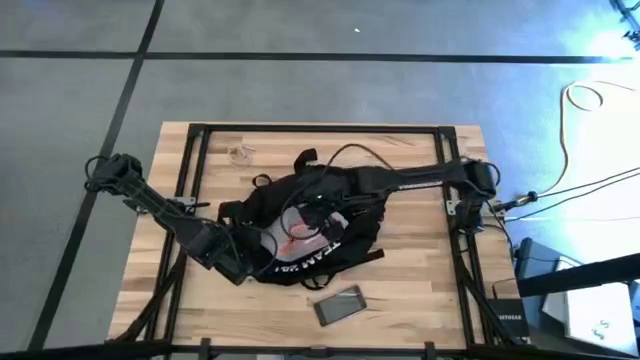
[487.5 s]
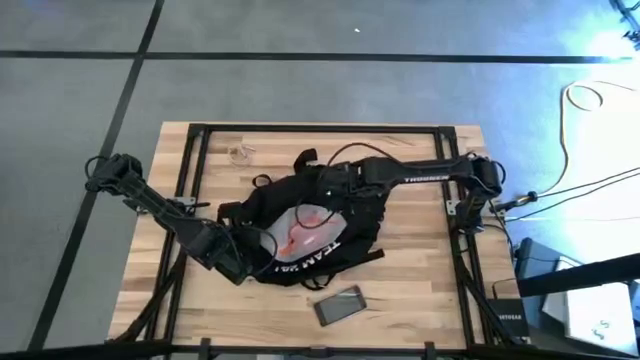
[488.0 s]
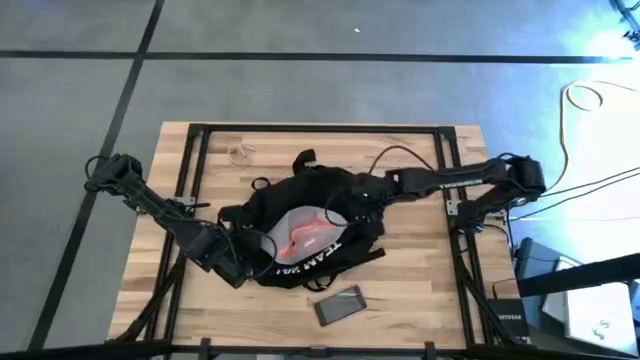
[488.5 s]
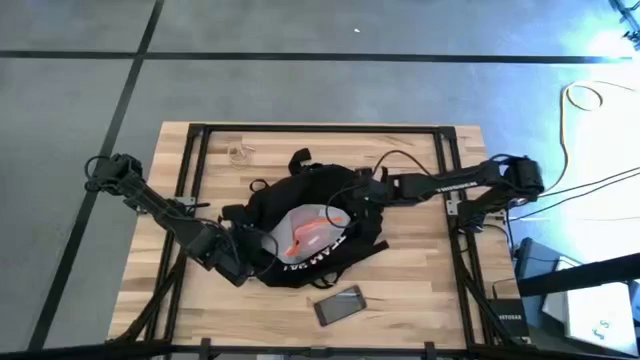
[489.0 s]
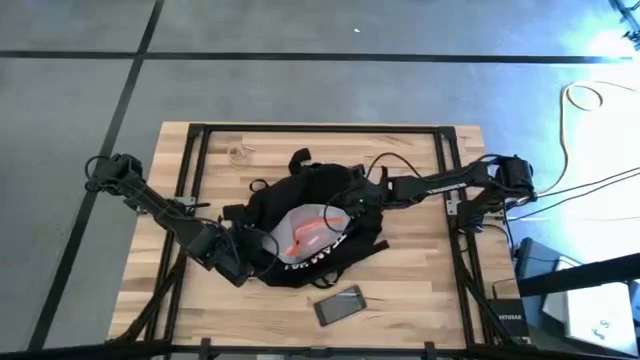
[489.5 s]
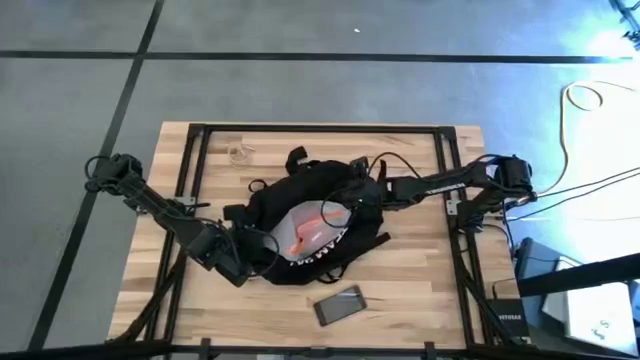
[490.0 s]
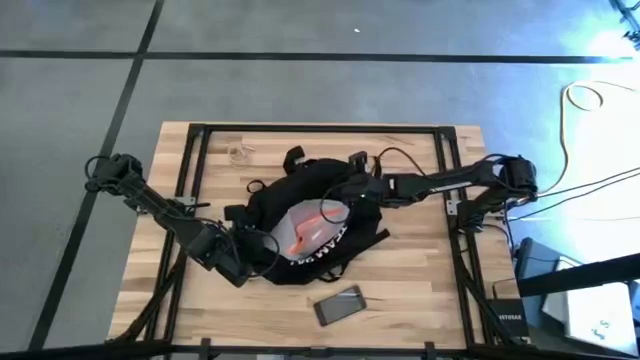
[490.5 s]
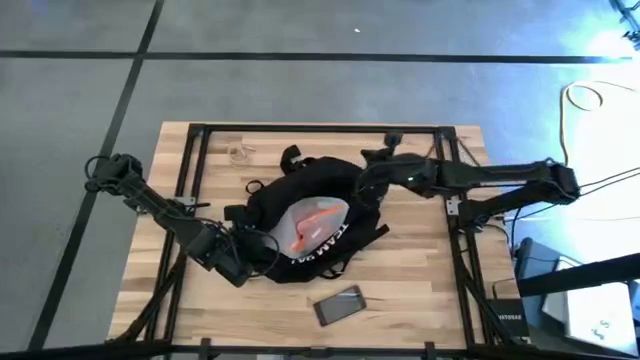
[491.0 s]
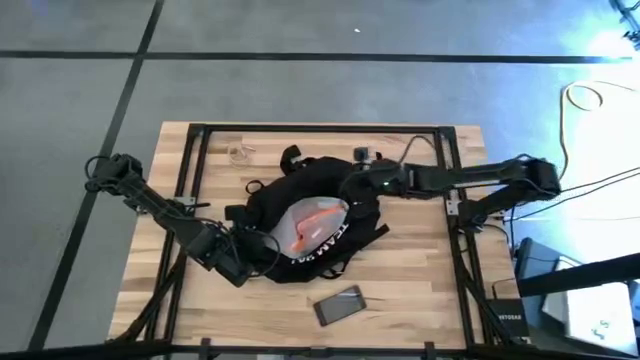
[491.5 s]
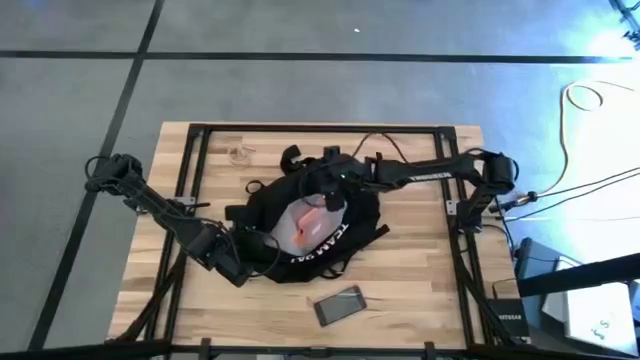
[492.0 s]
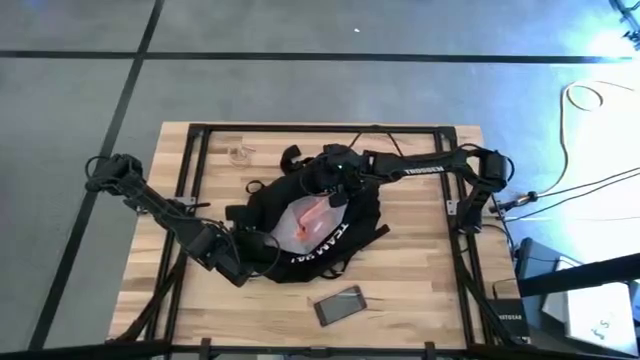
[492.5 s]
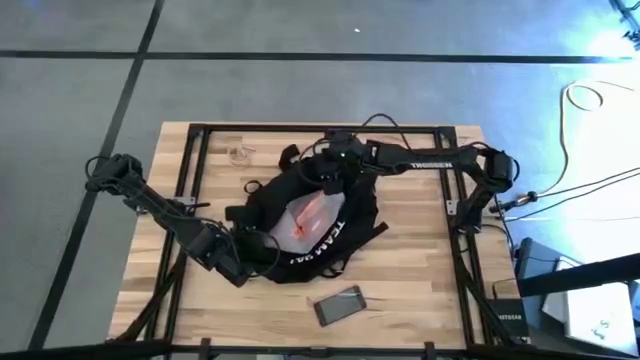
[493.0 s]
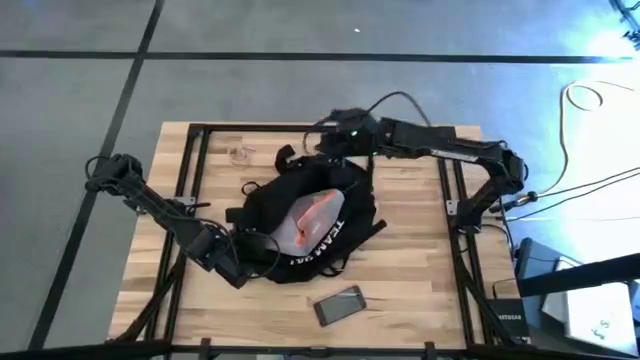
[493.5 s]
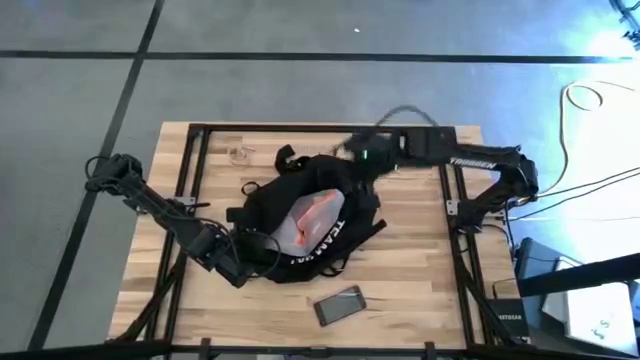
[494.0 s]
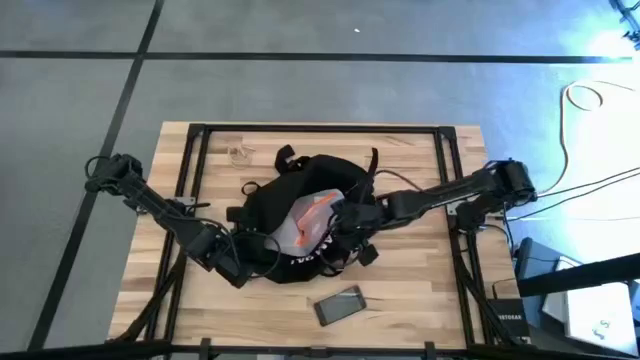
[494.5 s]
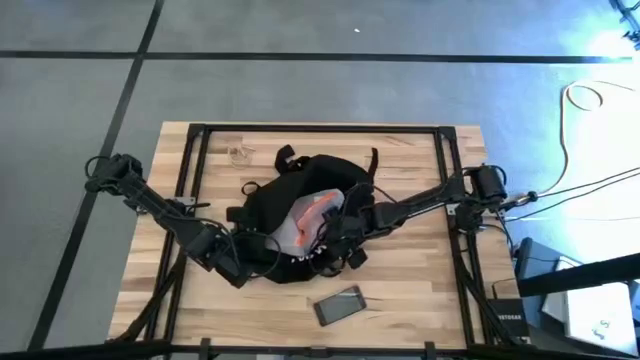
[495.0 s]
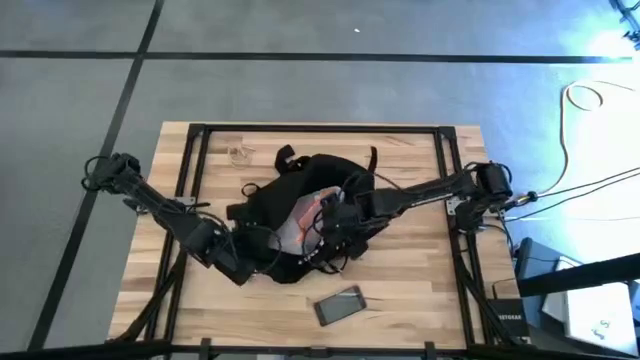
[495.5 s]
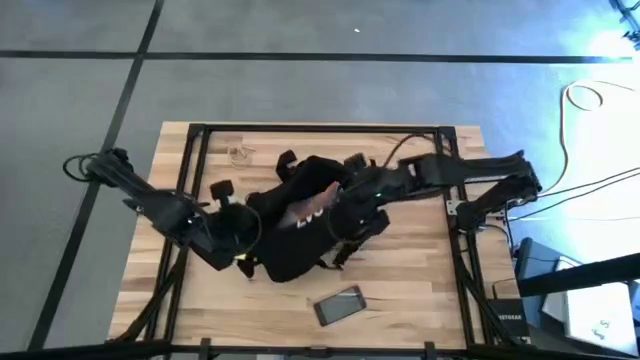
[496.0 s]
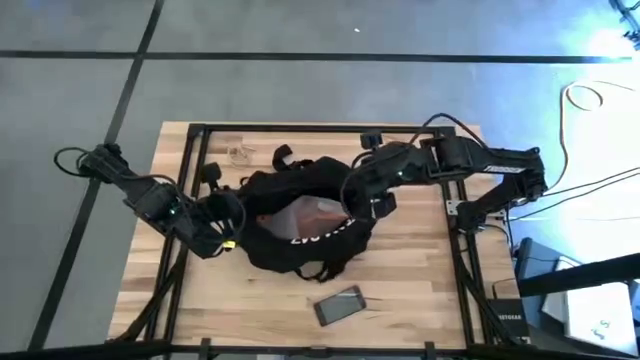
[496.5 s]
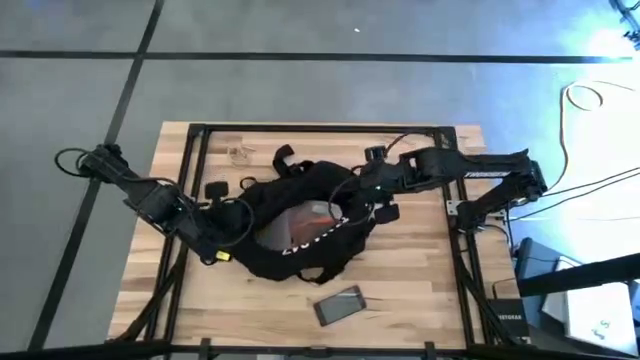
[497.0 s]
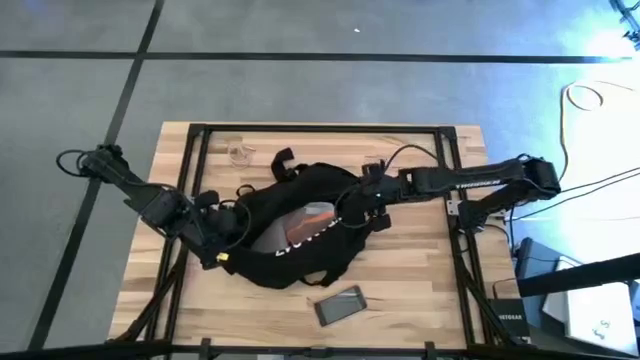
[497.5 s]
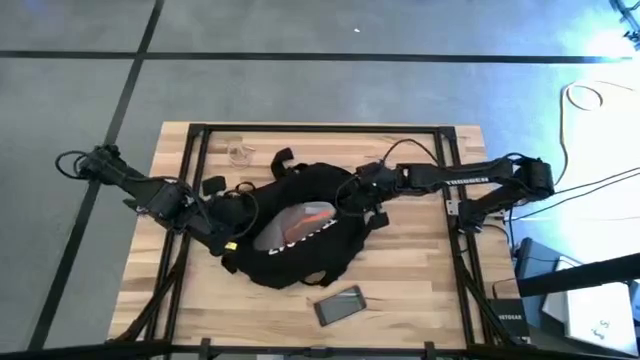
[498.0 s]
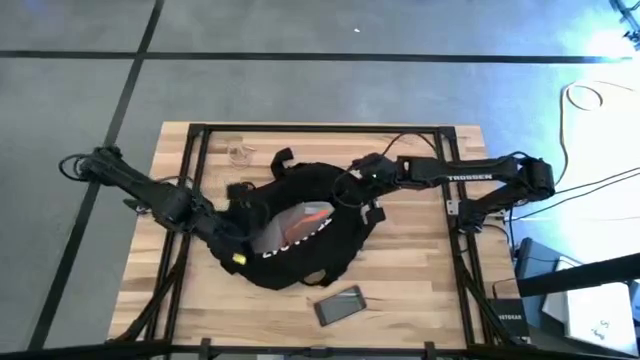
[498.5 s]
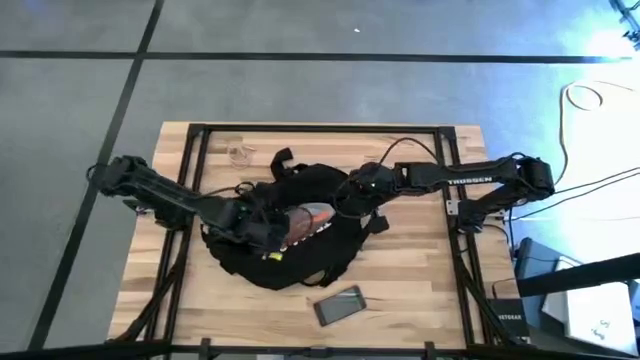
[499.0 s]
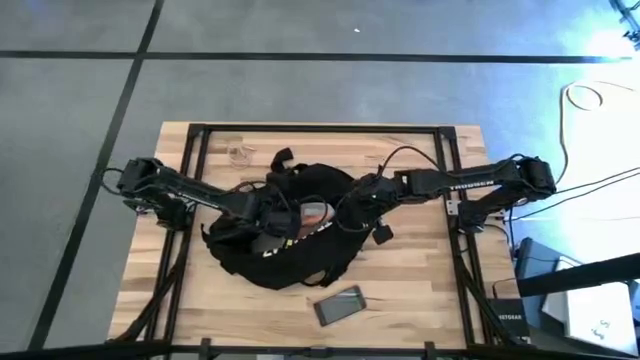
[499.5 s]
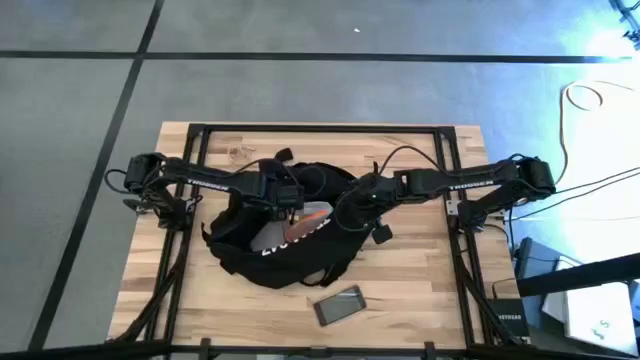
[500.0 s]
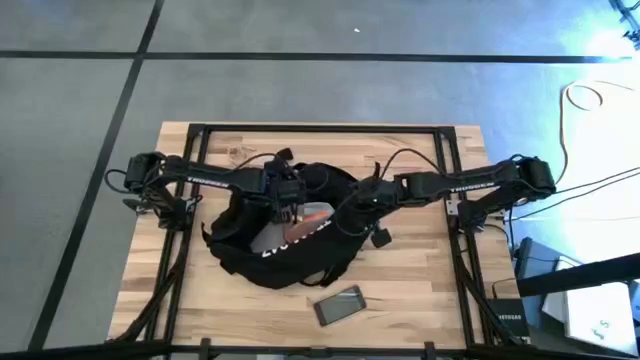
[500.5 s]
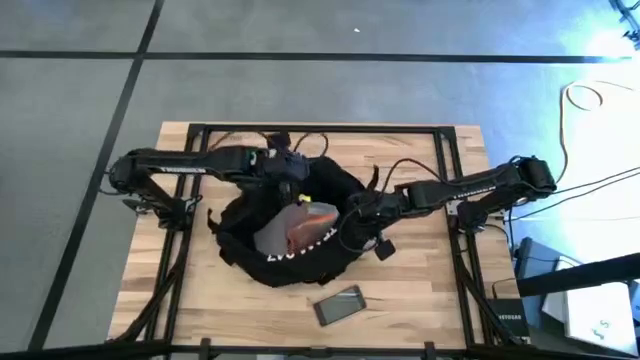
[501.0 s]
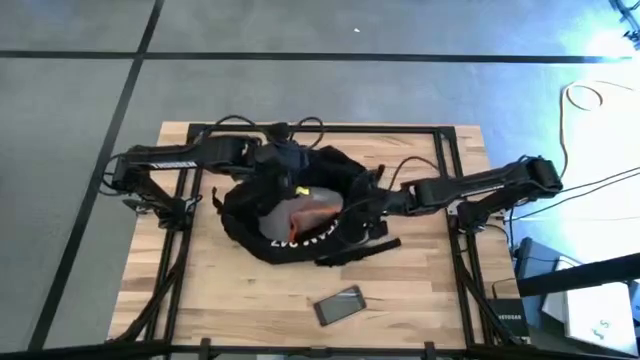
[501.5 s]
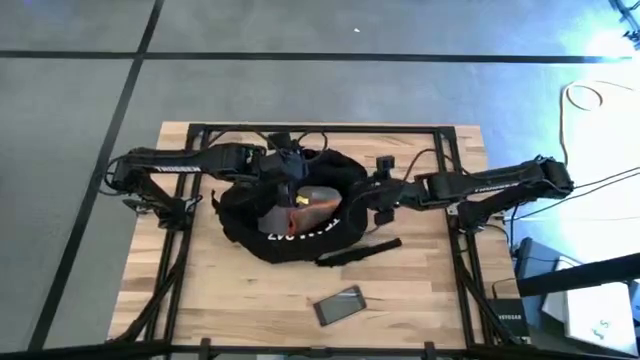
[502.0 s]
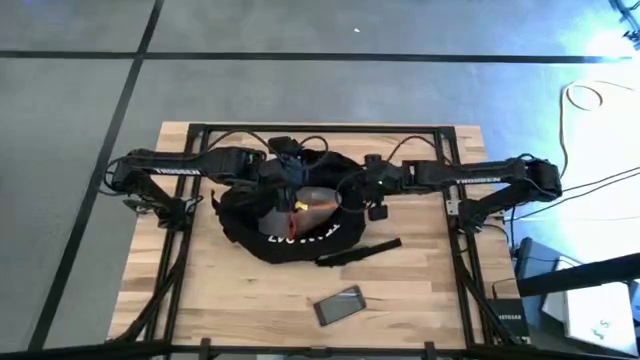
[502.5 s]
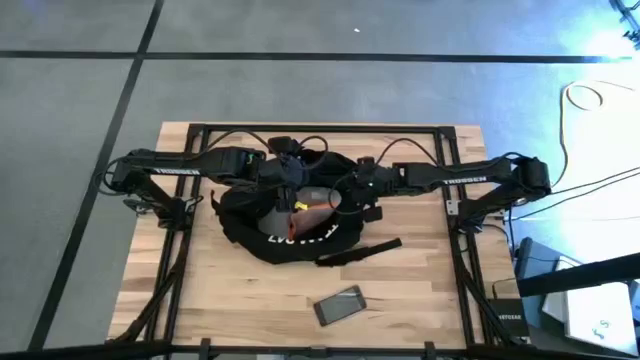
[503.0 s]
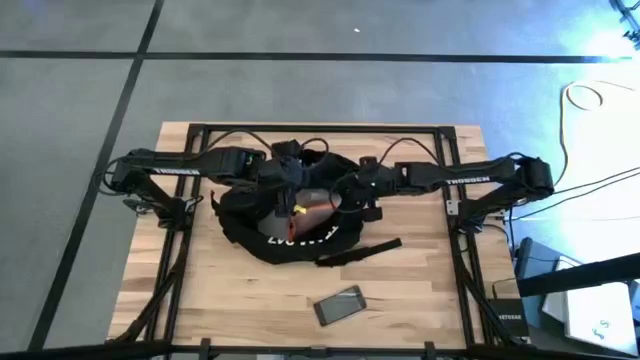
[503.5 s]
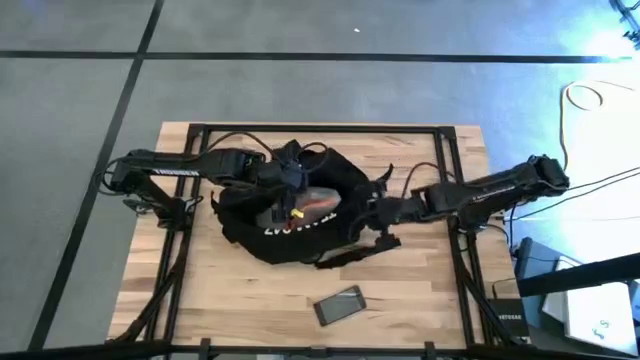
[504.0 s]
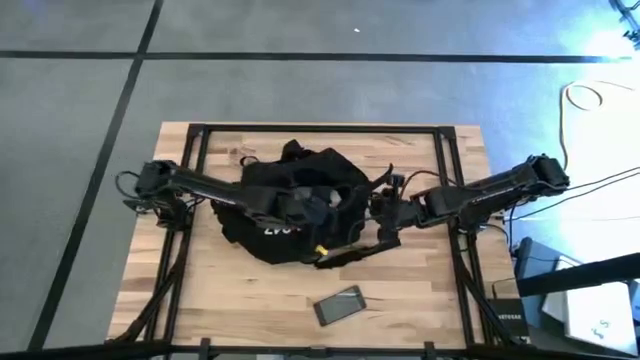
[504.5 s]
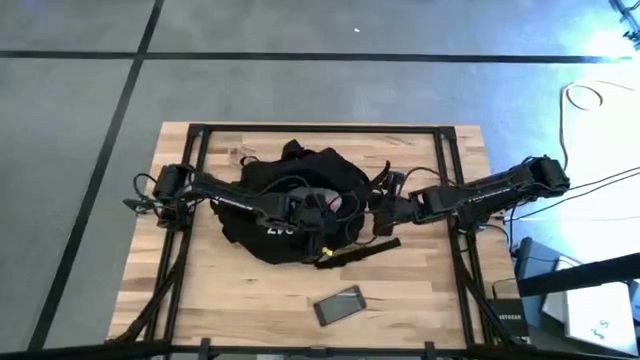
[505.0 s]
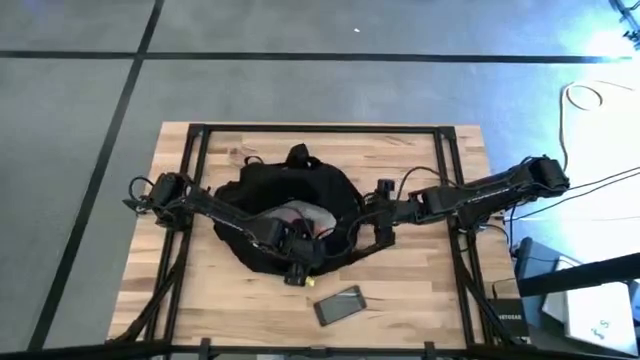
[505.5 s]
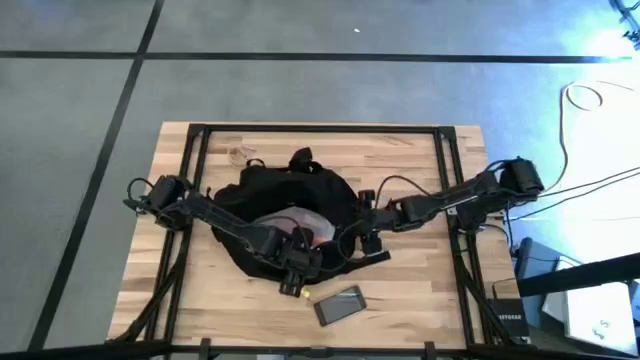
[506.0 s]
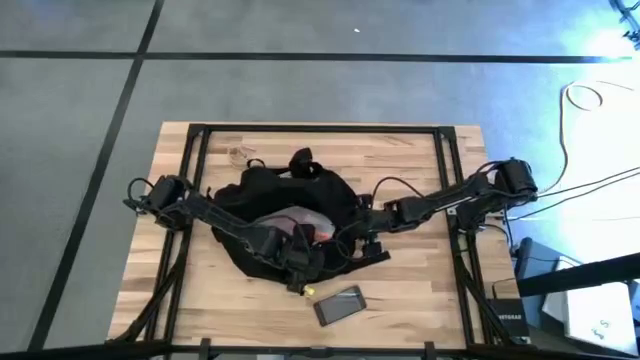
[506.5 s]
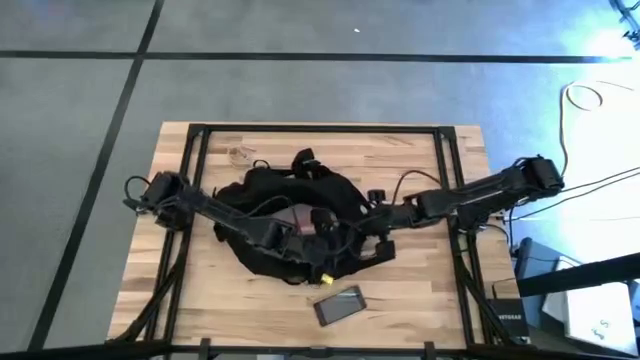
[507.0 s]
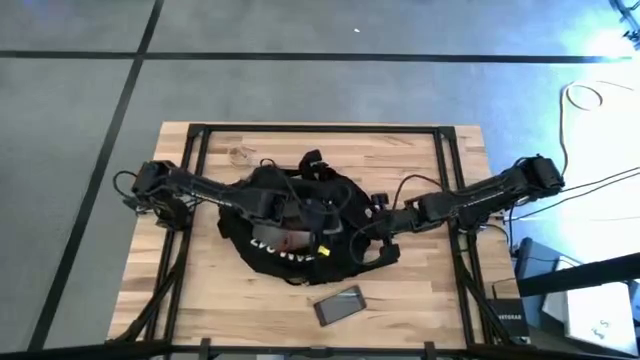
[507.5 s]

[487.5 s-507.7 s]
Task: Unpack backpack
Close the black backpack

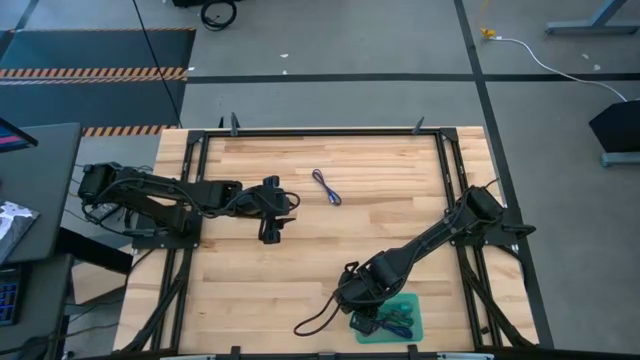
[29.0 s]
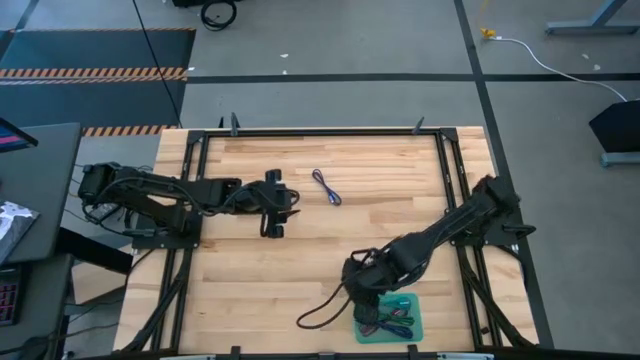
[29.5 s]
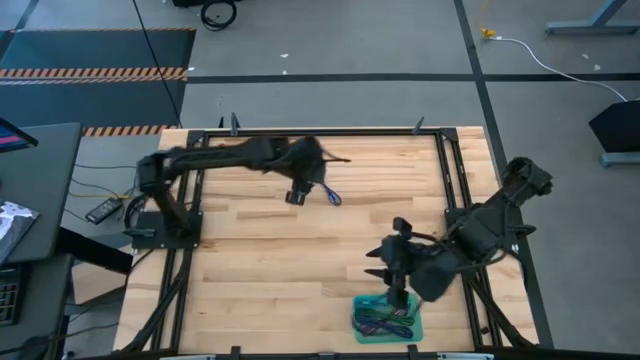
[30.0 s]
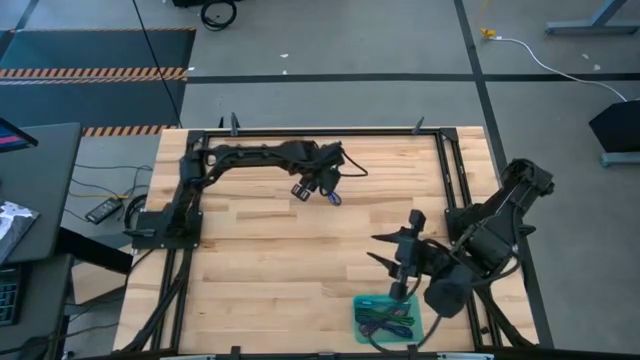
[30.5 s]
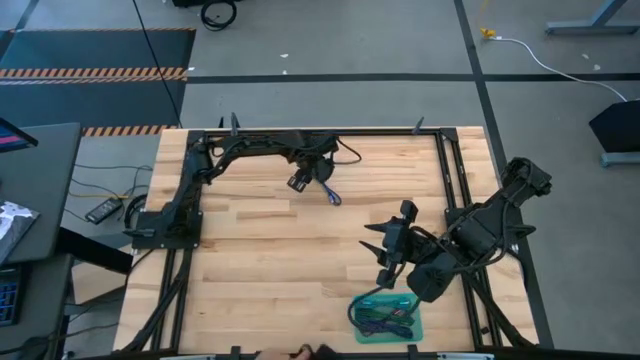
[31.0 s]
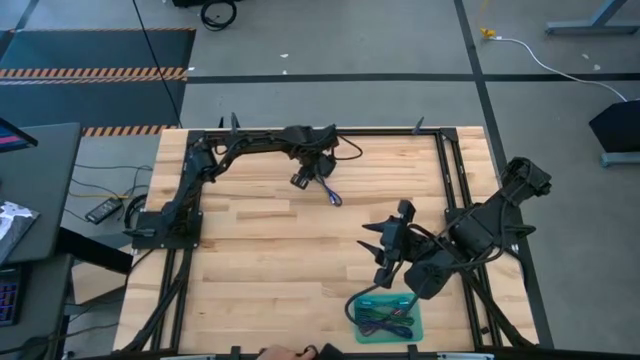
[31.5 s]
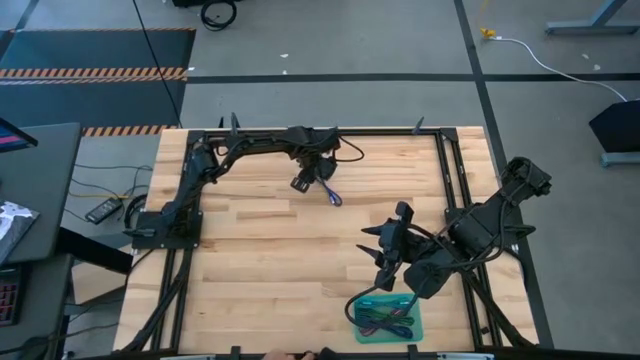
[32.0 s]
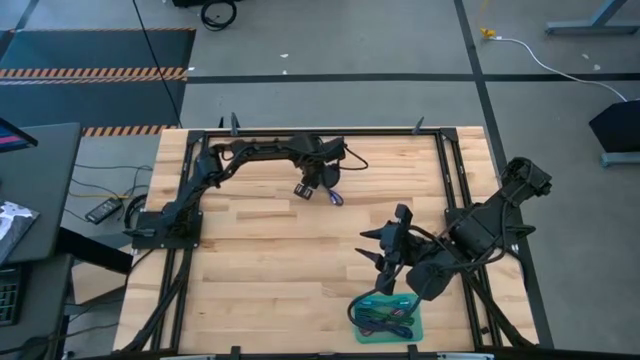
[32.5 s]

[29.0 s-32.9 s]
Task: Pick and place USB-C Cables
Put the purple charger cable into the blue bin
